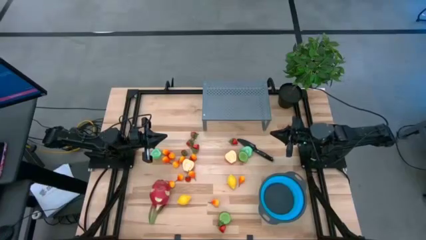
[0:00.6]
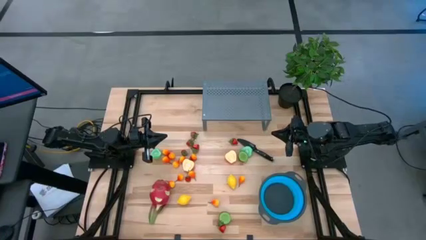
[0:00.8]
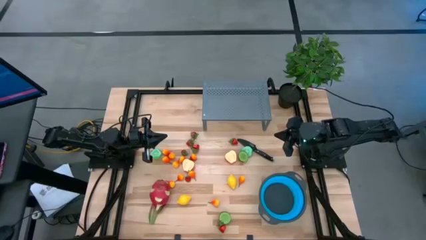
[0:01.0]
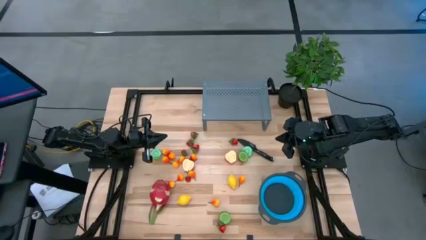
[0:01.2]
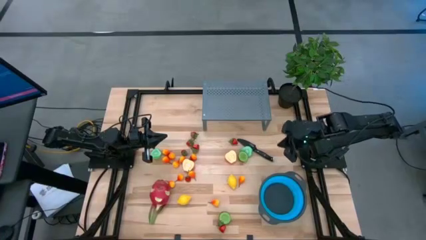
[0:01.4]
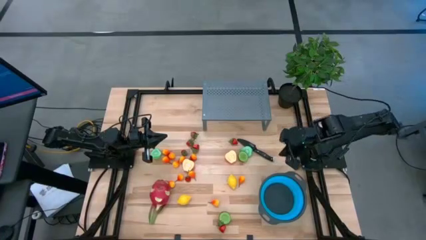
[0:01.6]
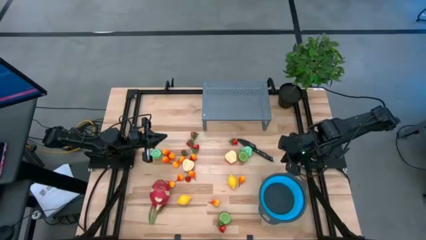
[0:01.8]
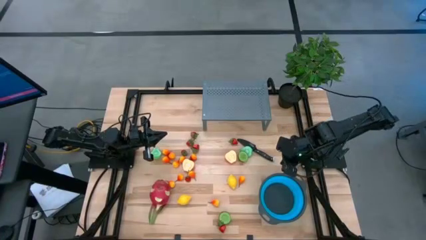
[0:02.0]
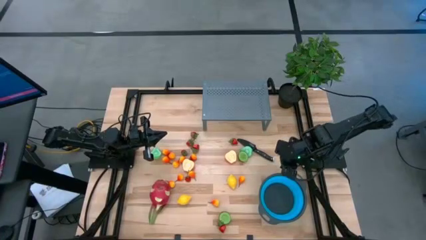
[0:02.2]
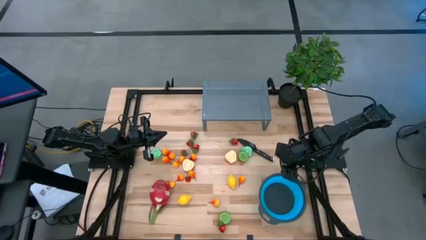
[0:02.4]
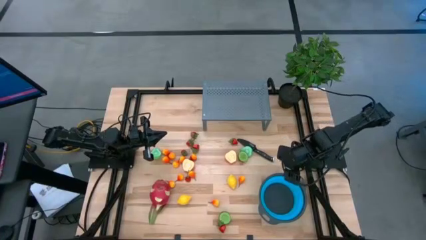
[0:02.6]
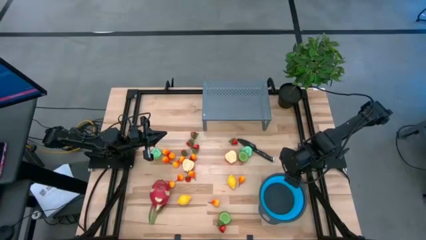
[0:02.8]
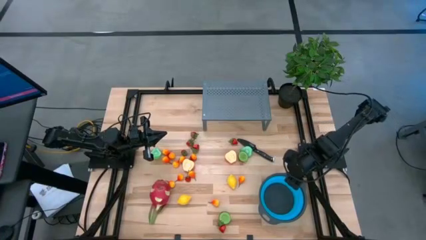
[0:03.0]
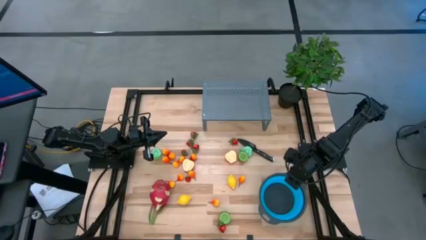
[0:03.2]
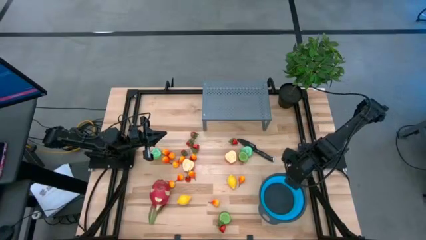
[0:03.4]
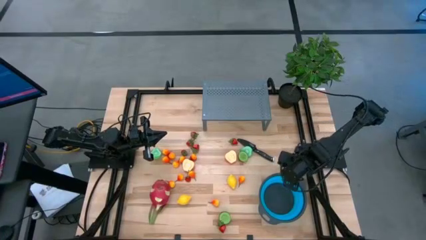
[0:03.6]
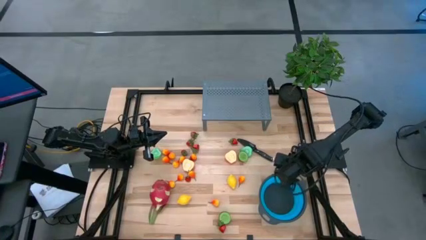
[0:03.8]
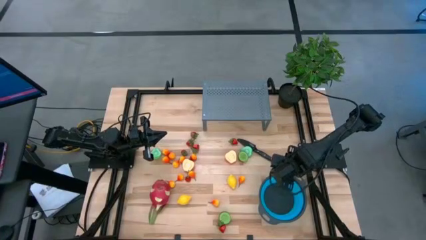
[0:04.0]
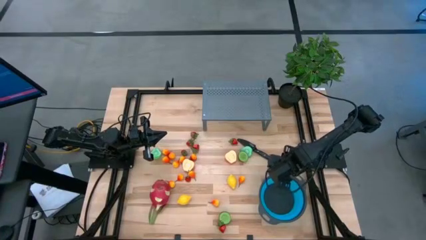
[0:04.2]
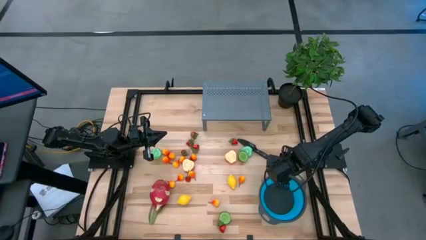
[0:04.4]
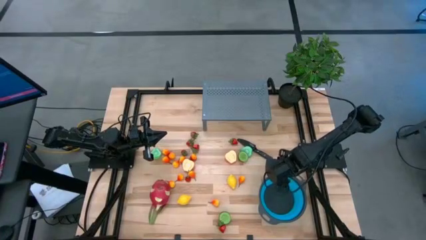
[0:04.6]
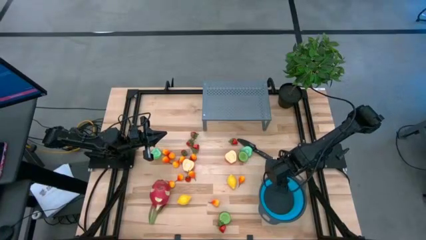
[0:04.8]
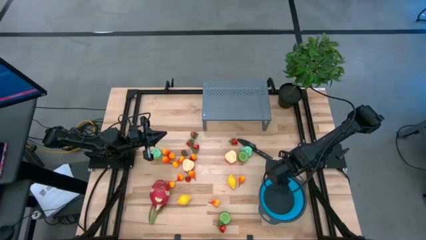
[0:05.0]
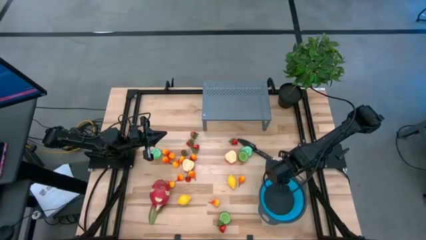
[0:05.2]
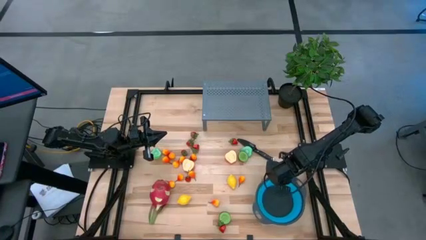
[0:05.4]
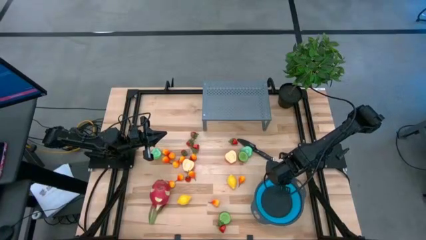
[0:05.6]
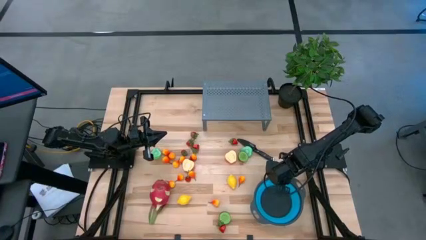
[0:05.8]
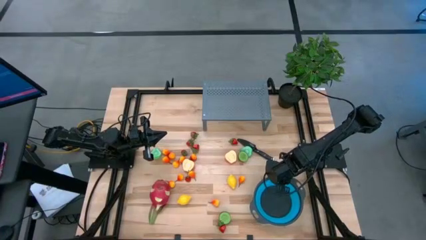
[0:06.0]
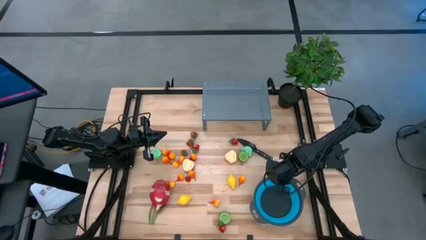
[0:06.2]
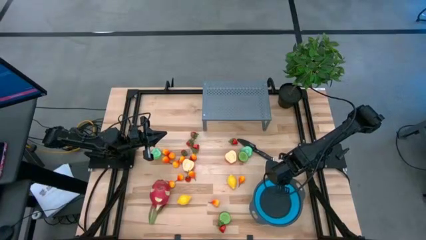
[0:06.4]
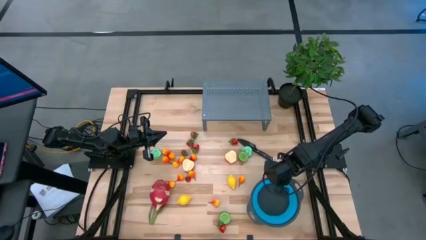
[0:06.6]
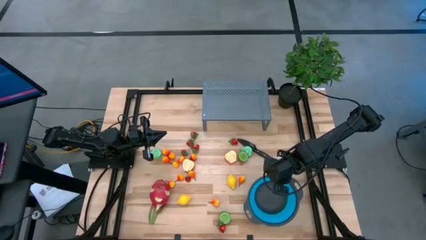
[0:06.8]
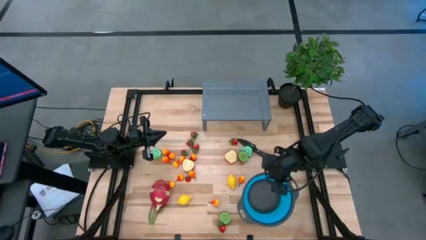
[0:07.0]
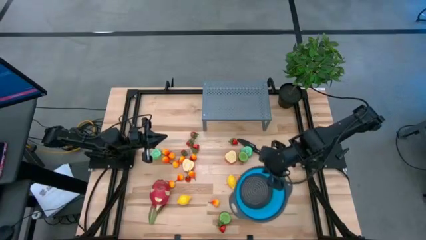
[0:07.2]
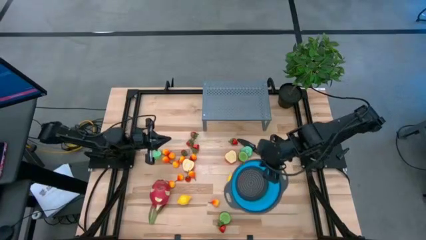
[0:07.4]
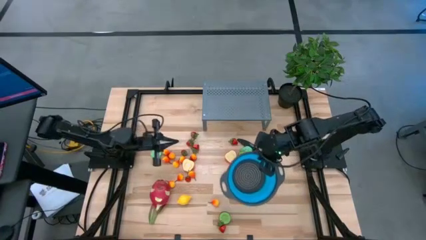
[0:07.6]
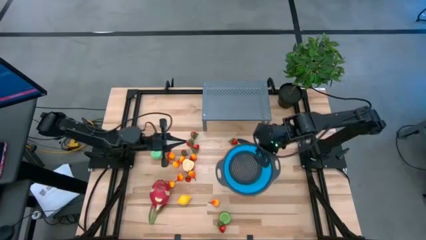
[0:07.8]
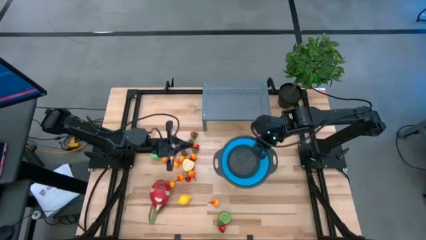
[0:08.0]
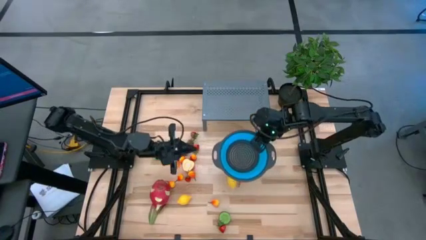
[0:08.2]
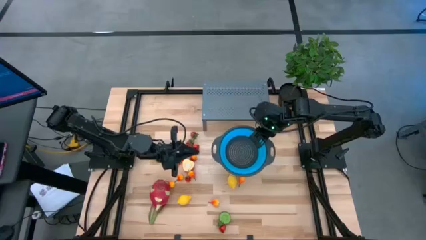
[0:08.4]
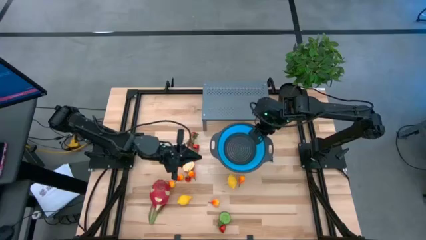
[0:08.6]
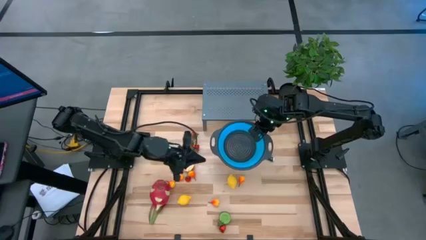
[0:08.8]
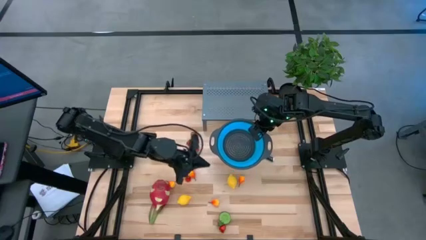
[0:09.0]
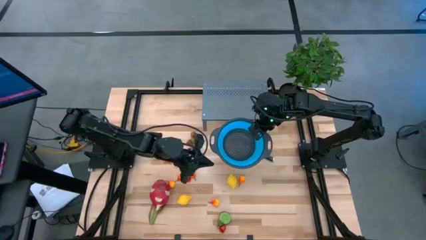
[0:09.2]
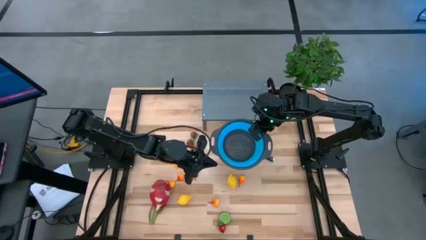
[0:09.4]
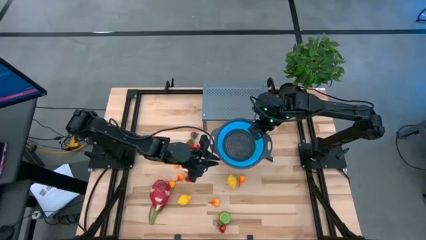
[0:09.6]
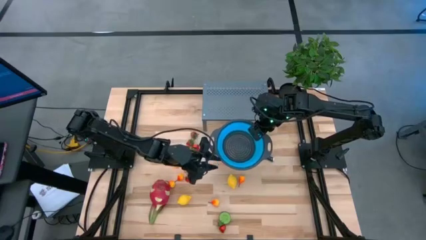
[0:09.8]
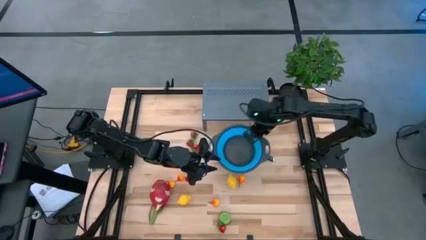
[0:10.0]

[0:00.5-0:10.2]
Task: Pick & Place Fruit
Put the strainer bowl on the left of the shelf

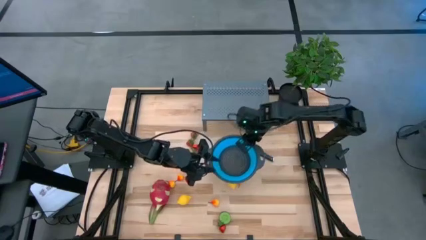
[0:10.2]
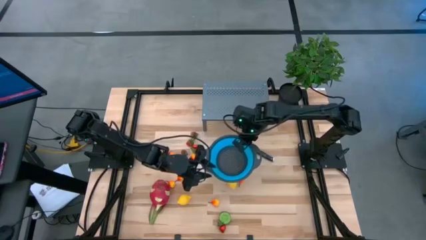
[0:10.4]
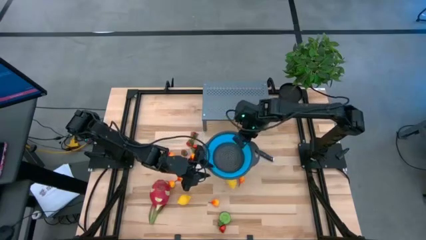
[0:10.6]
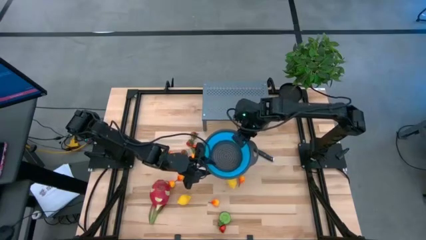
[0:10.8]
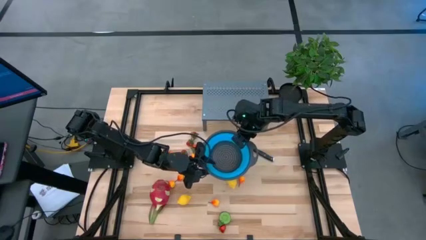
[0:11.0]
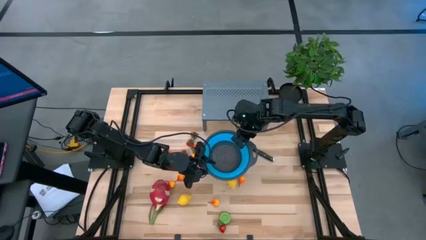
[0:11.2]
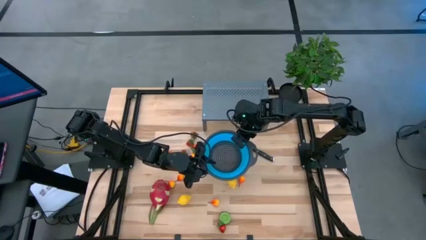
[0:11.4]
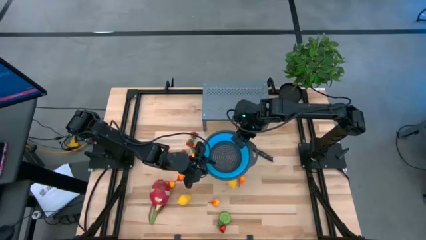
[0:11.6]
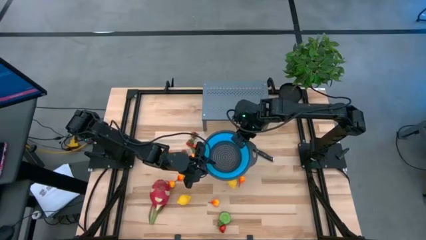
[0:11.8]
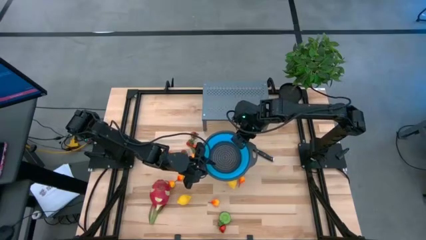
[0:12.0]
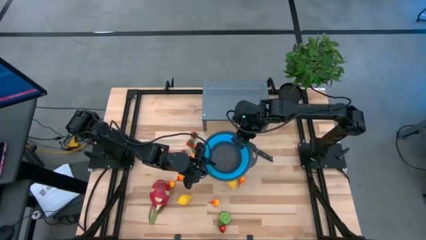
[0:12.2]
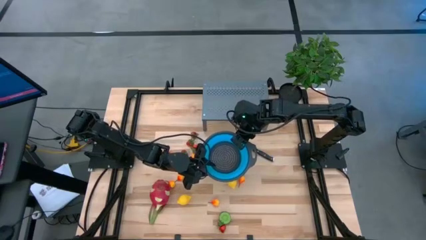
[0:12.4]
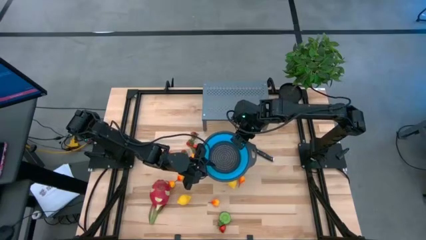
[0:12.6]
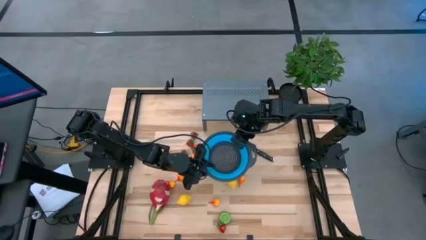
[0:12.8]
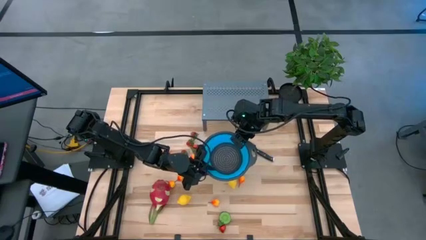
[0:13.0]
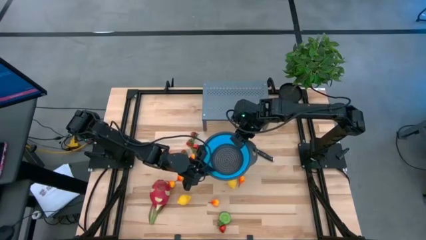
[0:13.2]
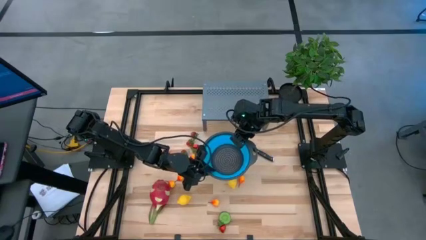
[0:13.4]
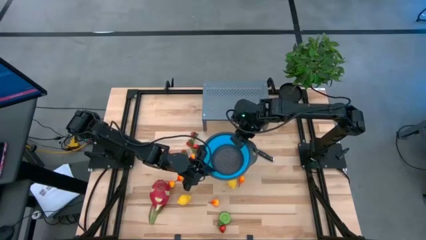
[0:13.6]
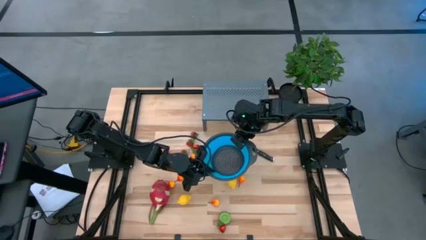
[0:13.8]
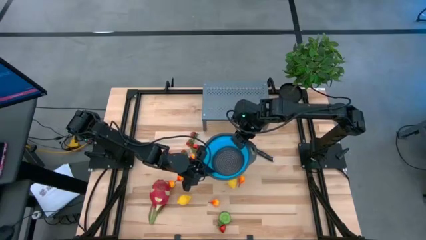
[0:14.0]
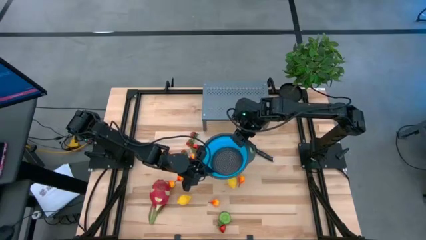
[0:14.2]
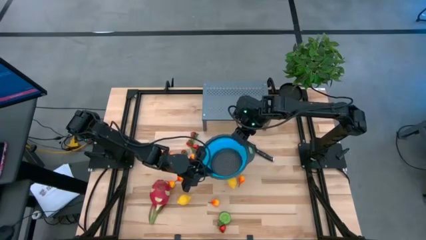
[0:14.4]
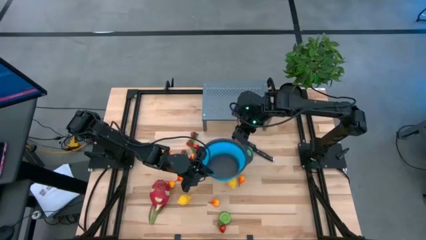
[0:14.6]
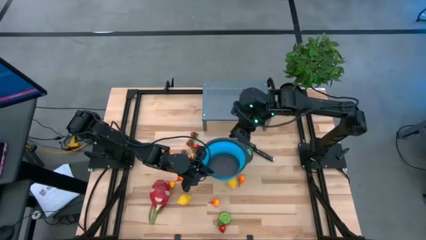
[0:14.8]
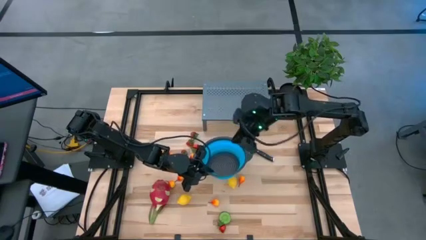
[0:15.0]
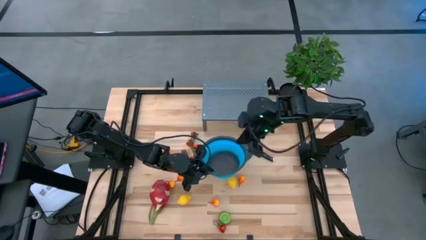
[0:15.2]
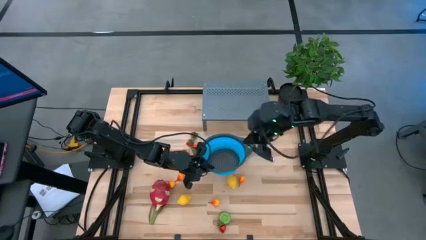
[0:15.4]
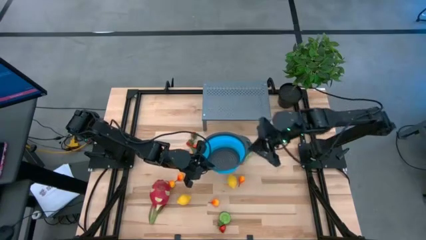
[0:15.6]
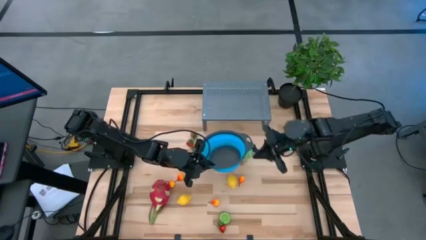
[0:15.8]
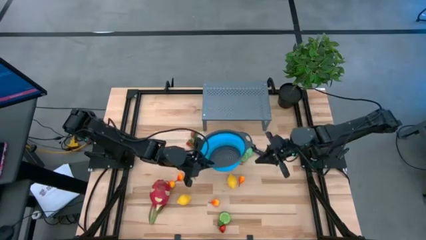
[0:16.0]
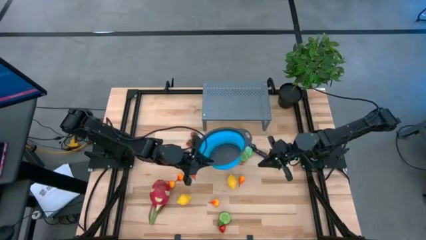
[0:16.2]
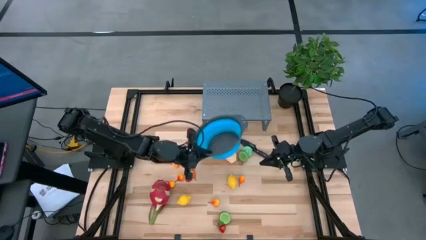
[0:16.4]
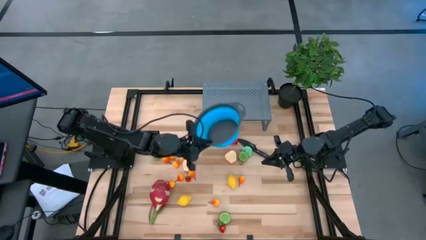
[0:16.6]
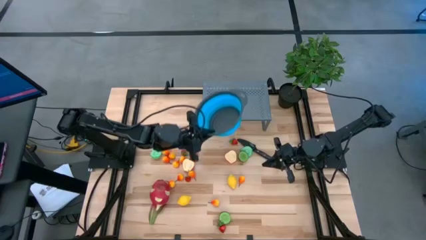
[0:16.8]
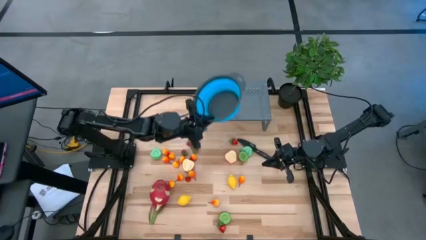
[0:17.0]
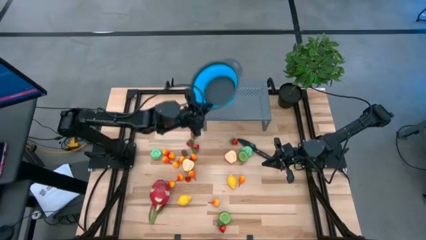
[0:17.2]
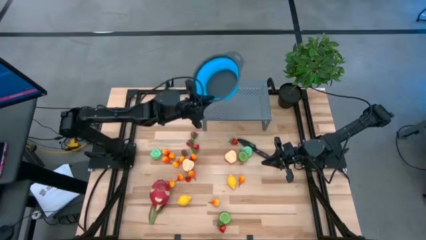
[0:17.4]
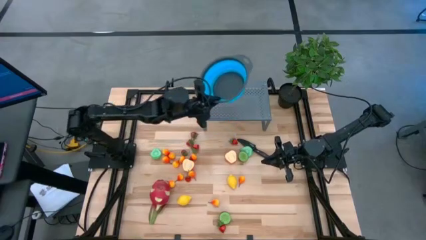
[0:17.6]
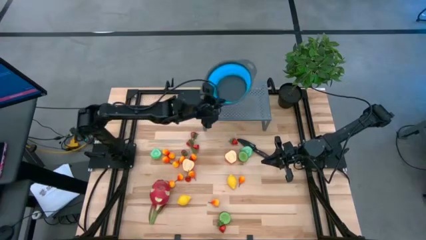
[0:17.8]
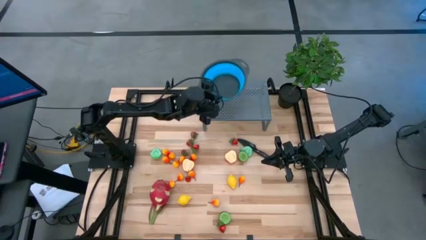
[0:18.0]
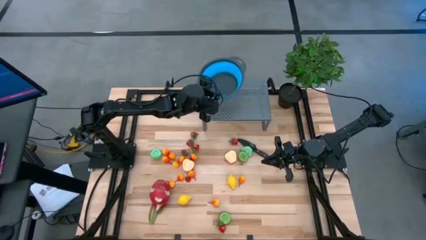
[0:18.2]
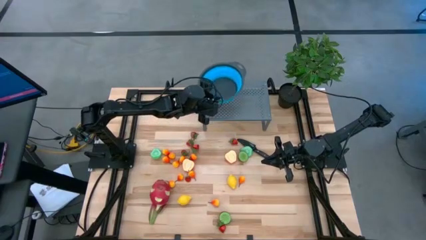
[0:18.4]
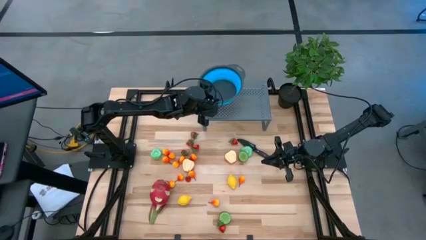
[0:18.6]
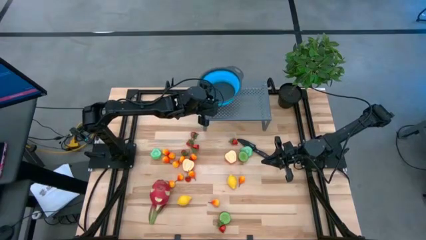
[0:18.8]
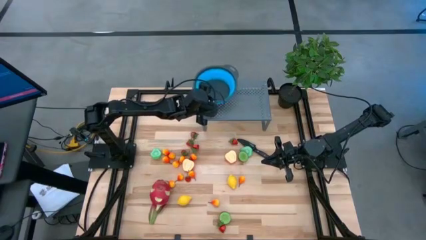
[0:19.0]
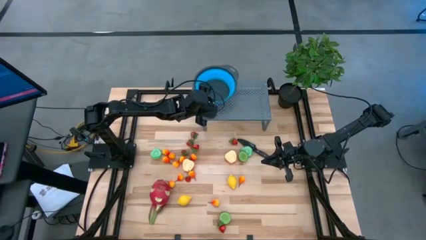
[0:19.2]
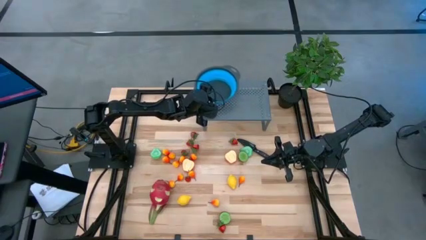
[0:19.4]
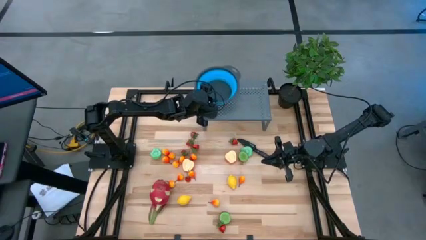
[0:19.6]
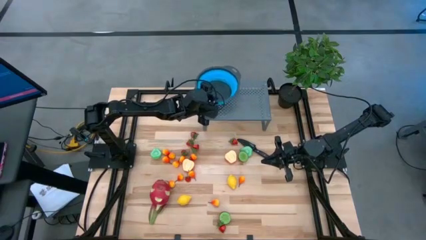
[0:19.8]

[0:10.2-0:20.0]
Put the strainer bowl on the left of the shelf
